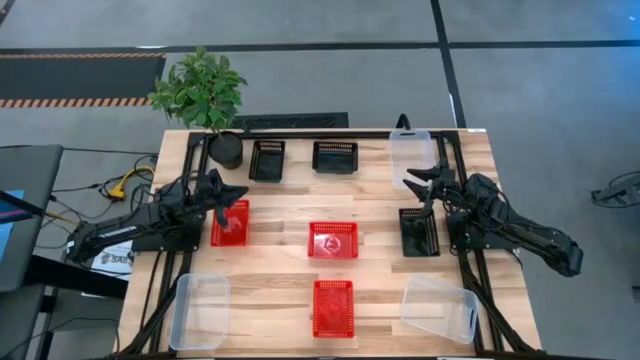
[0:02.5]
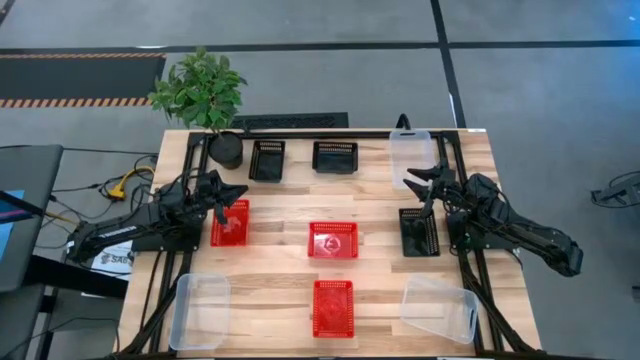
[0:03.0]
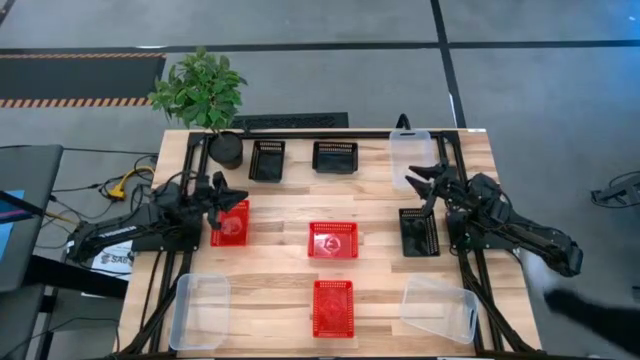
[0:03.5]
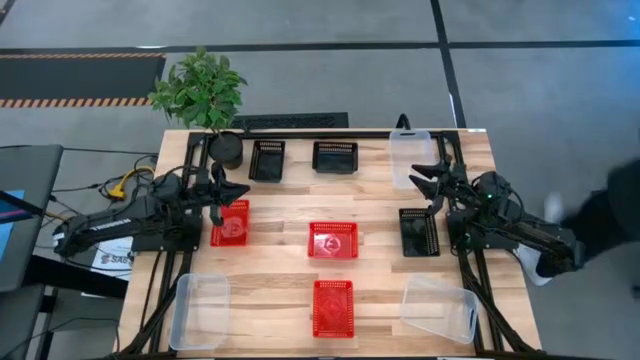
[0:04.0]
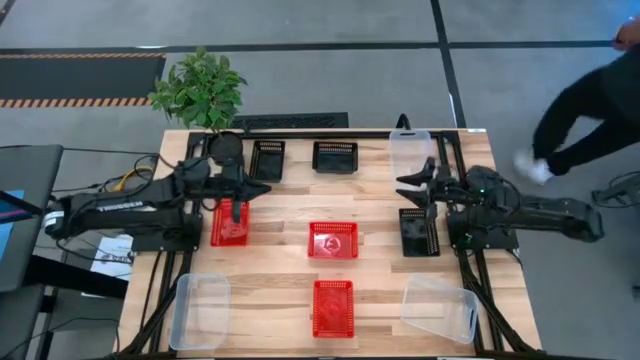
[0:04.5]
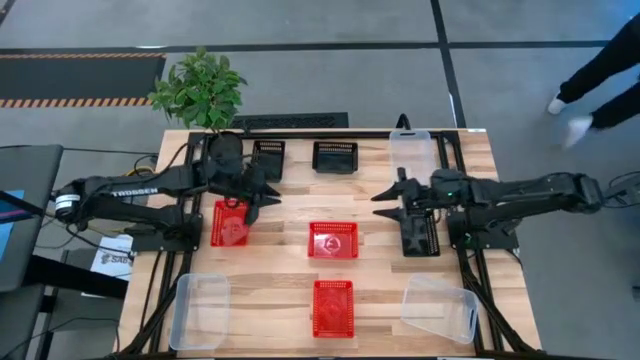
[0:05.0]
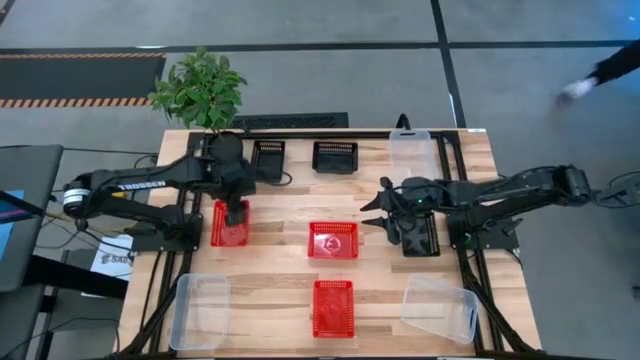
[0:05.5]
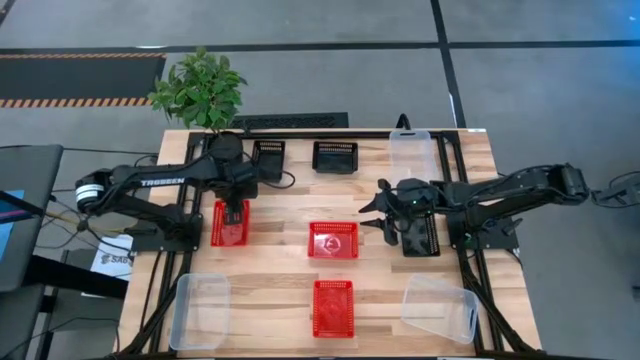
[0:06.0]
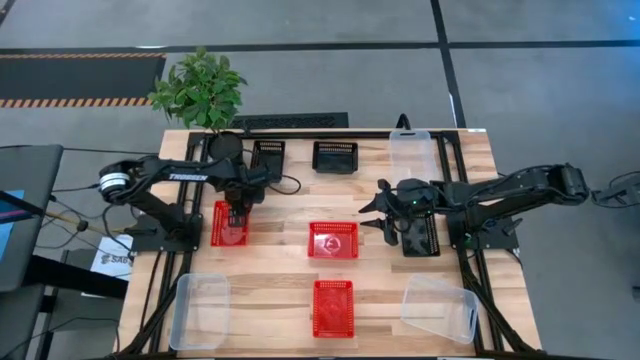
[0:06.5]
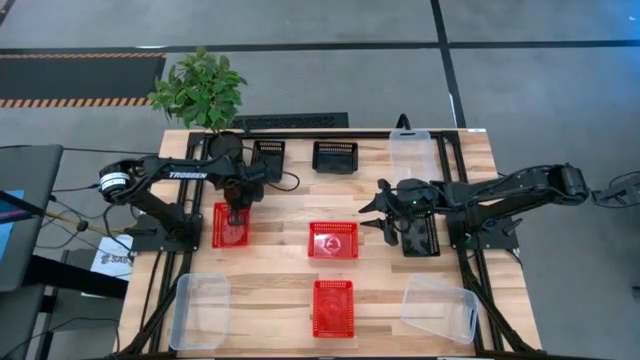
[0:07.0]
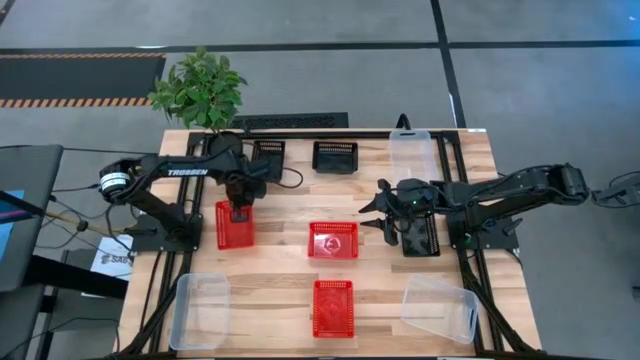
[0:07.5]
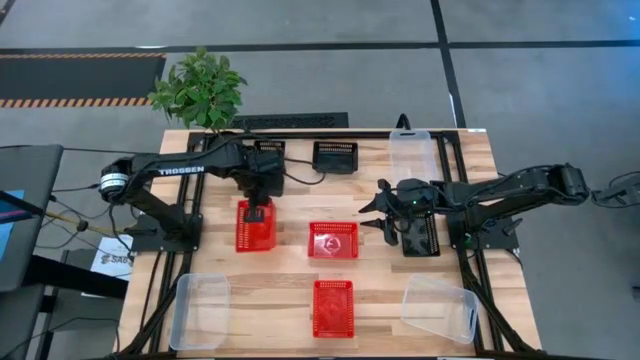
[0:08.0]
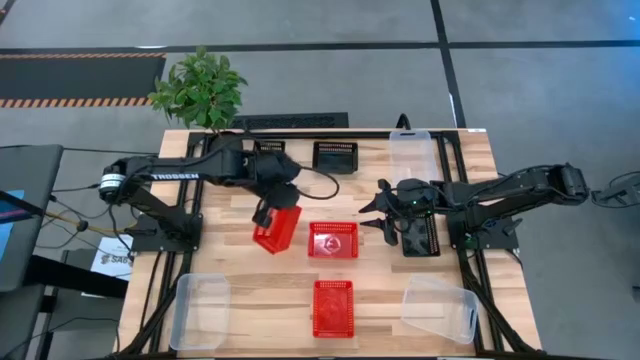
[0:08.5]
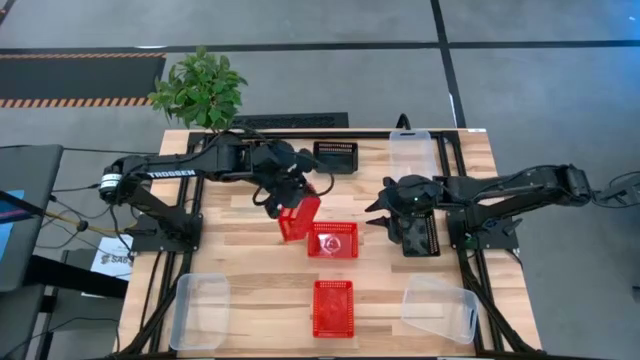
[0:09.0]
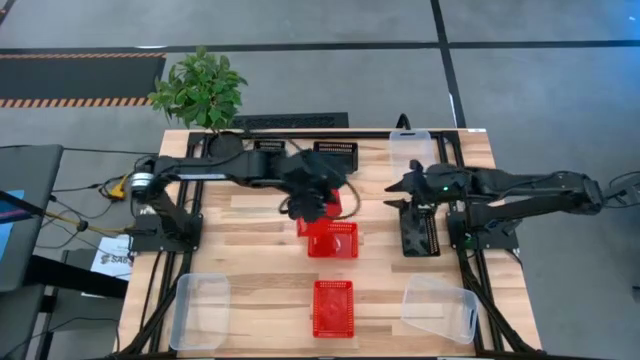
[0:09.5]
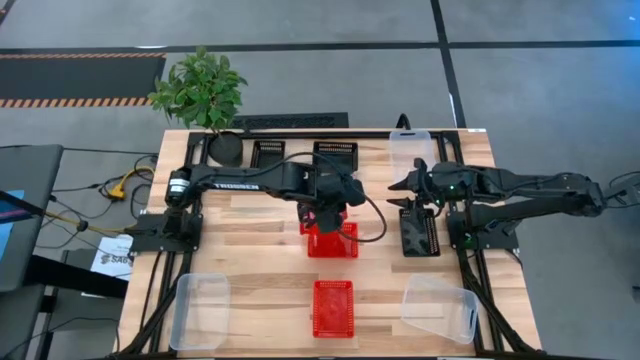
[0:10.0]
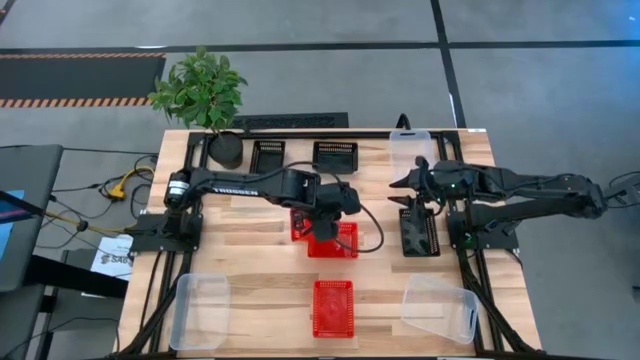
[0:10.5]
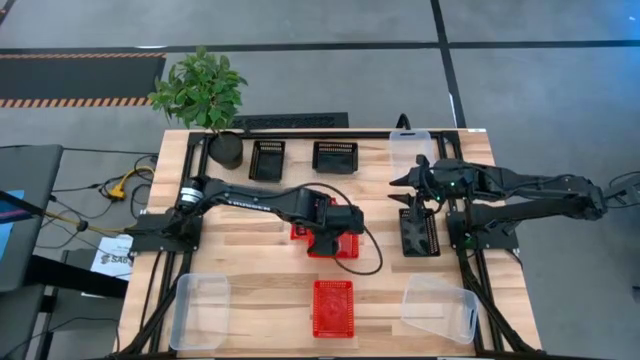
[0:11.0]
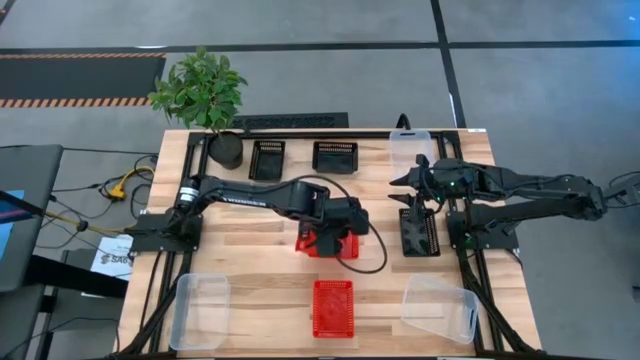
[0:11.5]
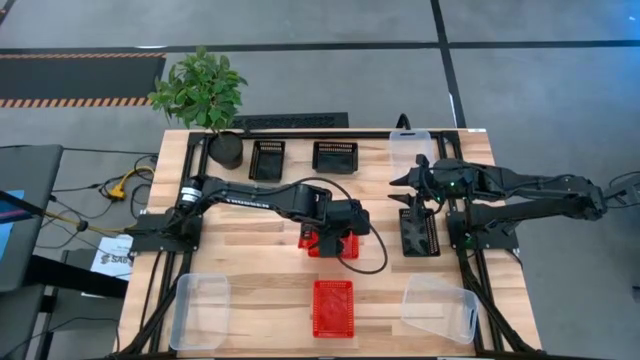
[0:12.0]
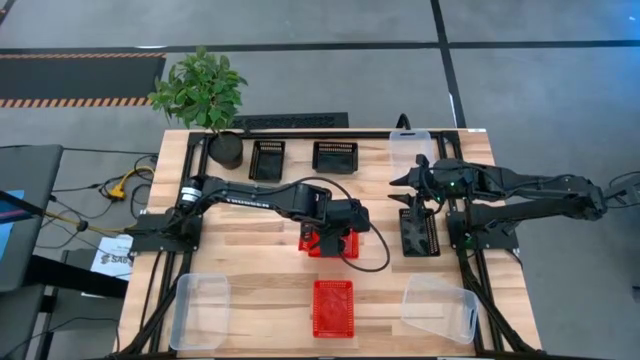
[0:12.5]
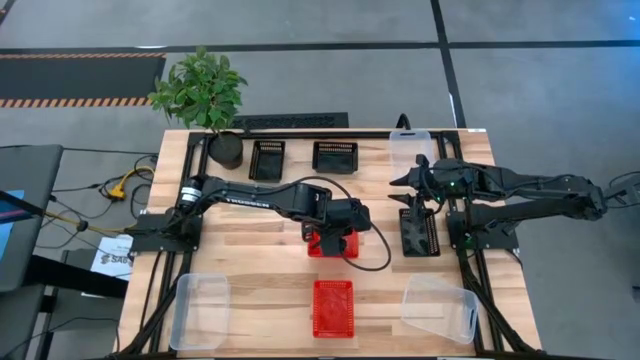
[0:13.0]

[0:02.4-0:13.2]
Stack the top left red bin on top of the top right red bin

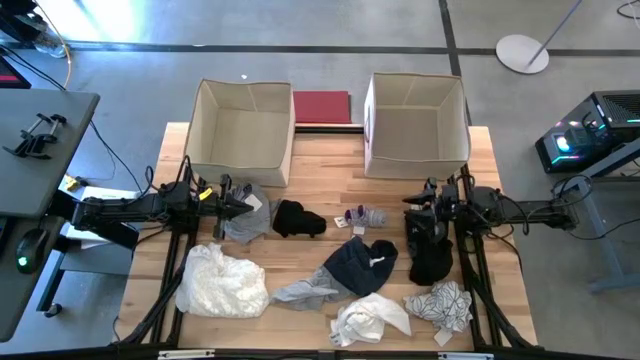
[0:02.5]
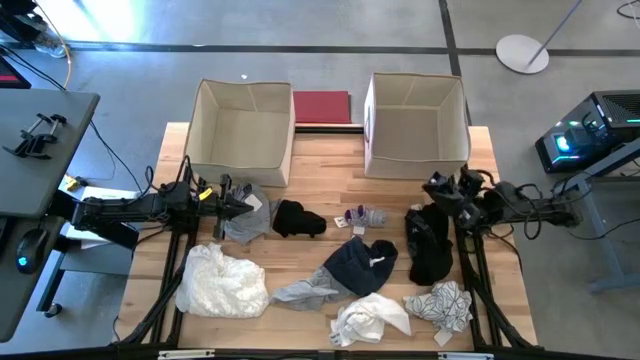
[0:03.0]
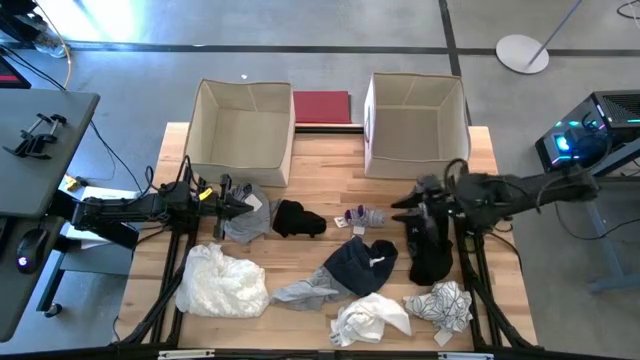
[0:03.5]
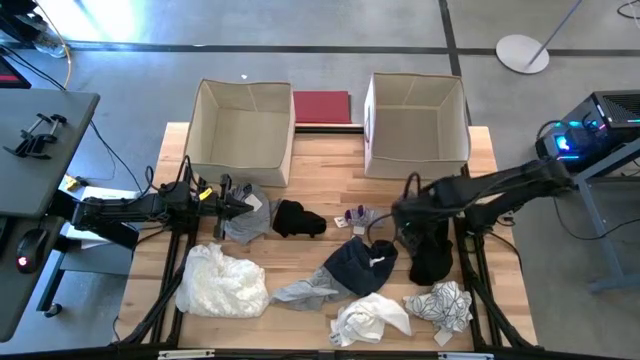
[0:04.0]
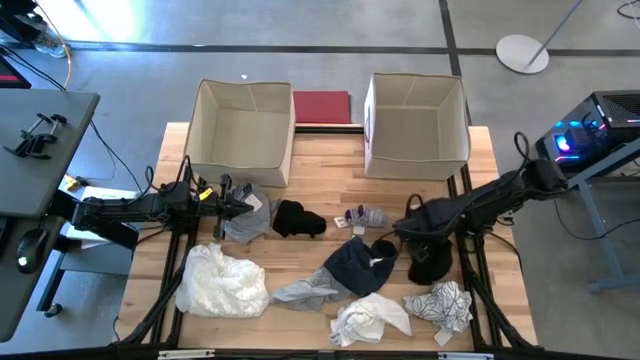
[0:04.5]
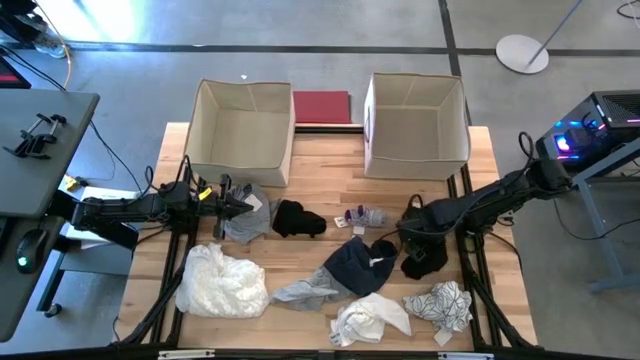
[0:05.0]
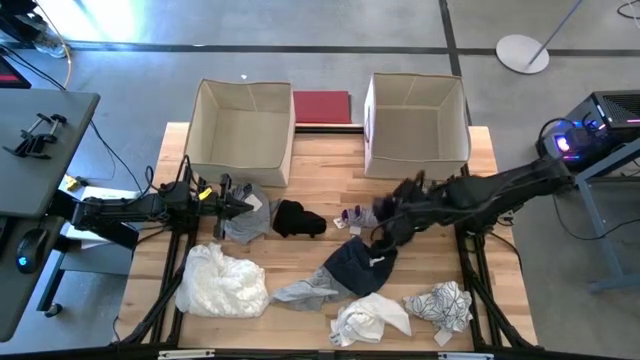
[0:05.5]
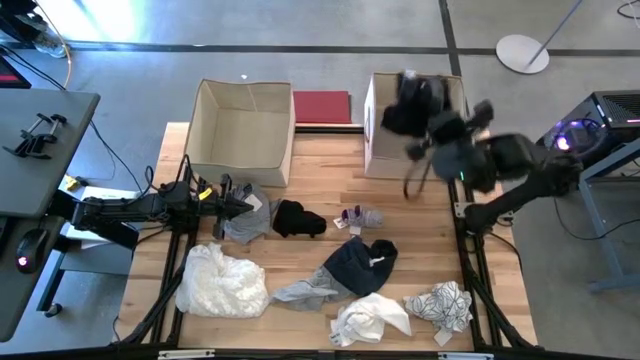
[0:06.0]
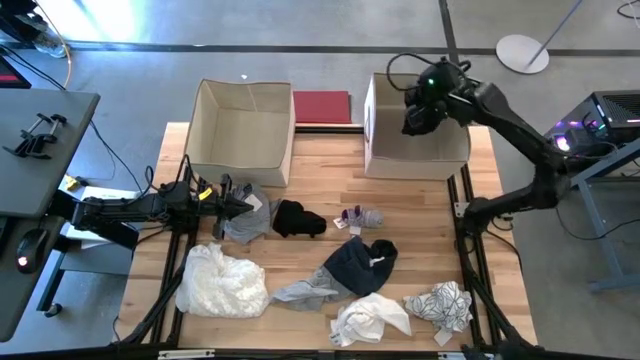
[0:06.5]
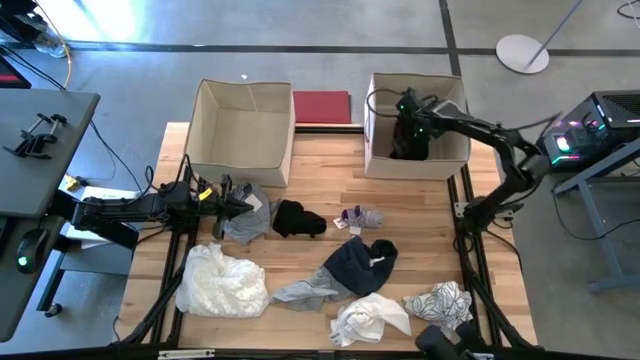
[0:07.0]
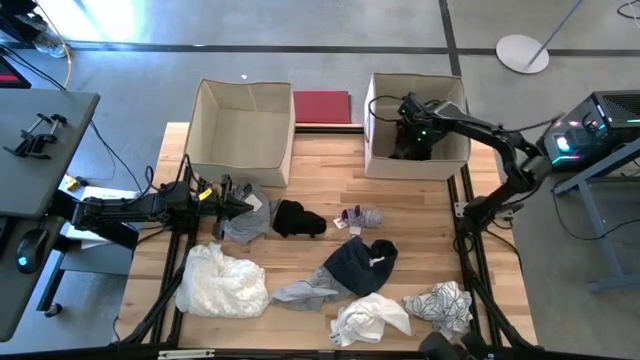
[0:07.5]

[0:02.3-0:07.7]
Put the black underwear into the right laundry organizer

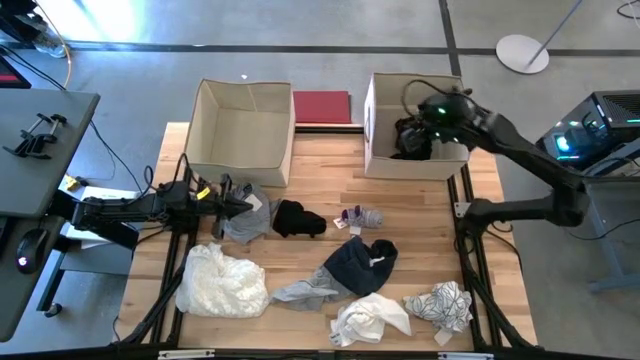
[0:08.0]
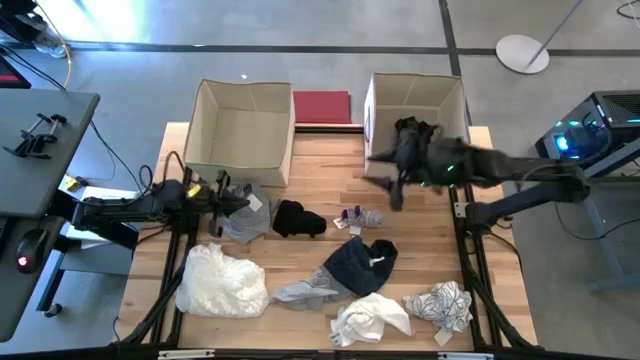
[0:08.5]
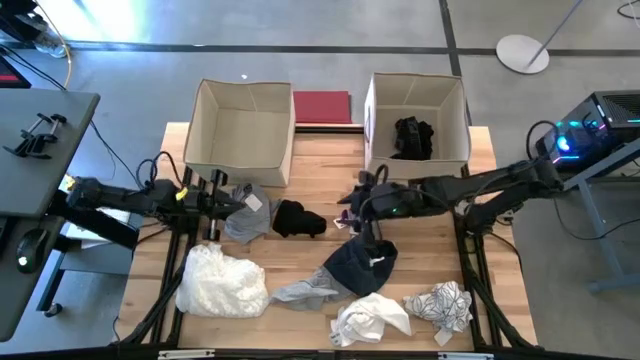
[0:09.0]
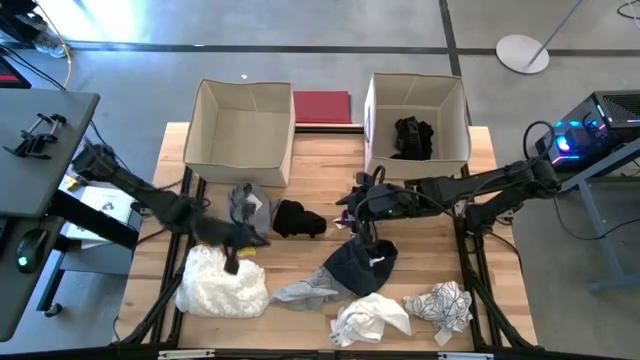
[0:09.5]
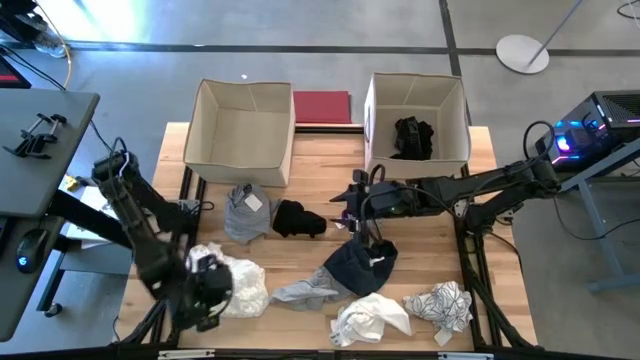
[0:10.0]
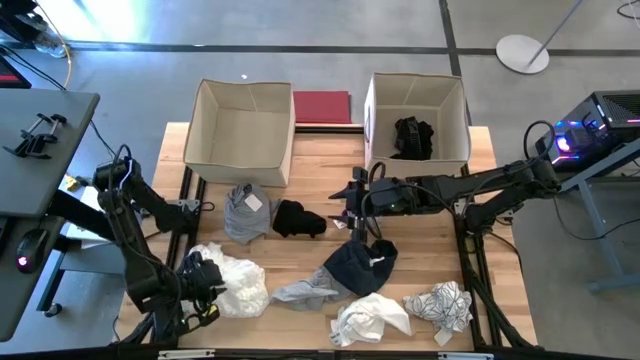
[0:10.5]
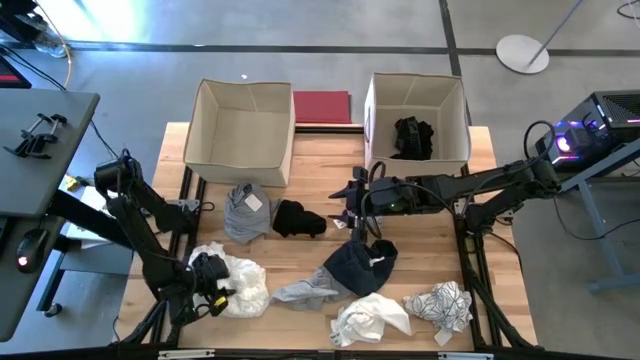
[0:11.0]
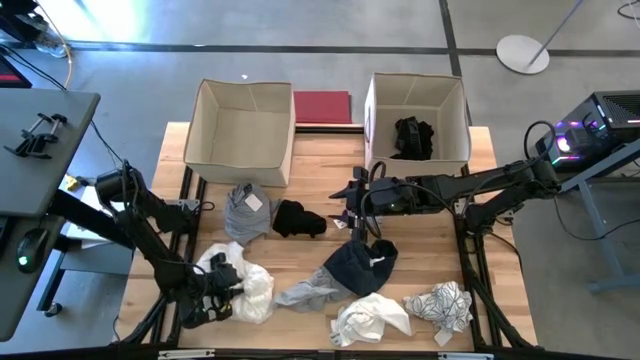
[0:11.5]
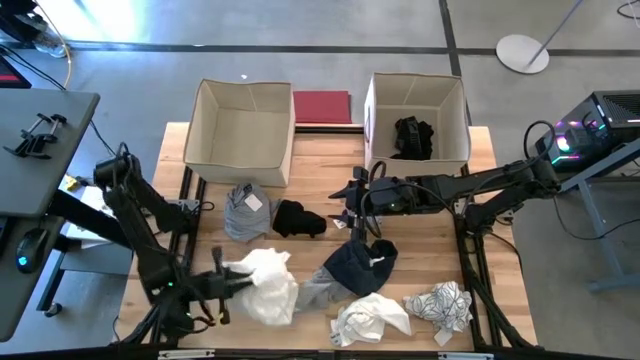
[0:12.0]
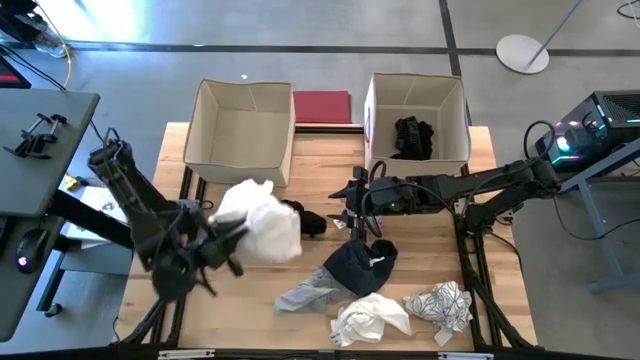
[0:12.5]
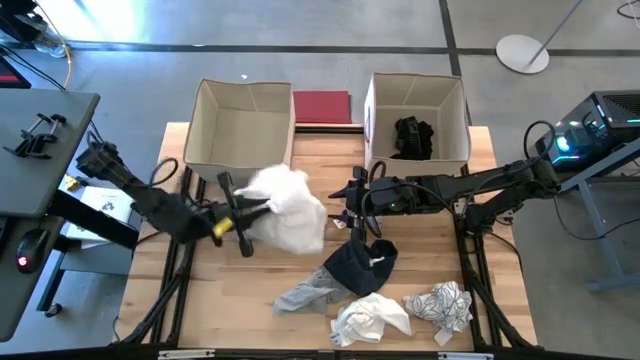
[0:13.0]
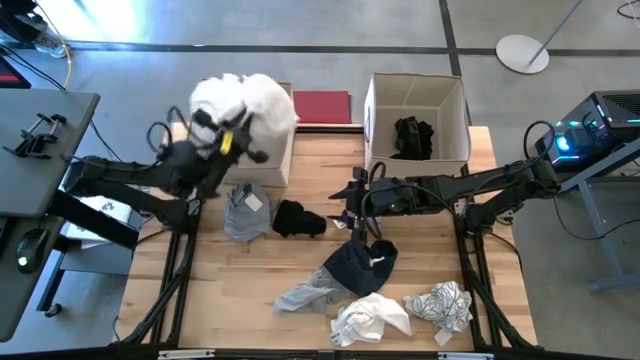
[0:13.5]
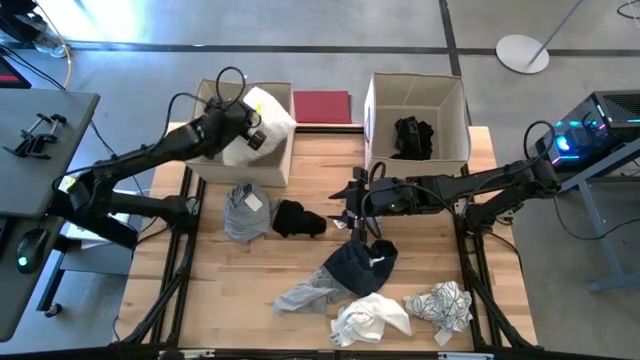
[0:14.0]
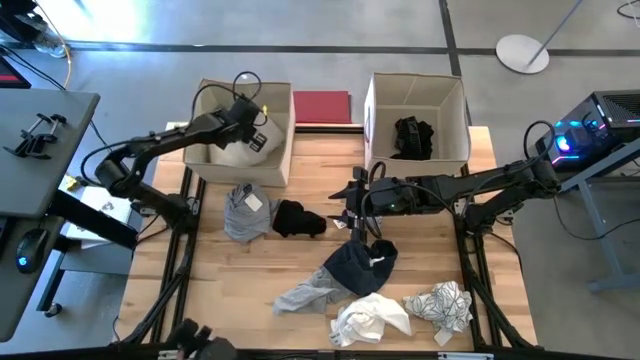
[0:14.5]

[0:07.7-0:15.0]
Put the white dress into the right laundry organizer
